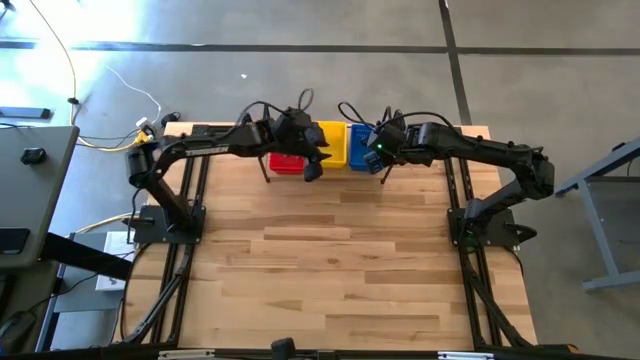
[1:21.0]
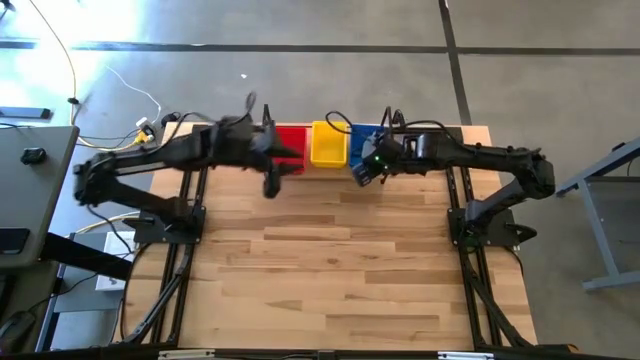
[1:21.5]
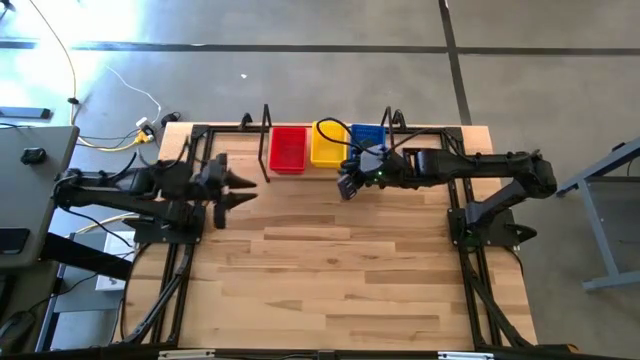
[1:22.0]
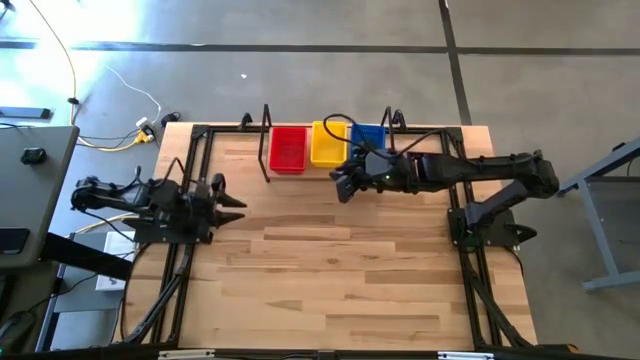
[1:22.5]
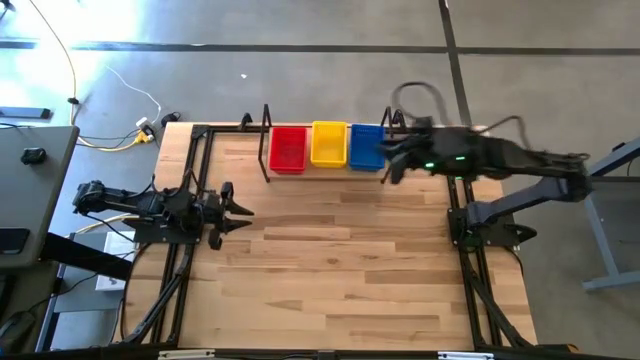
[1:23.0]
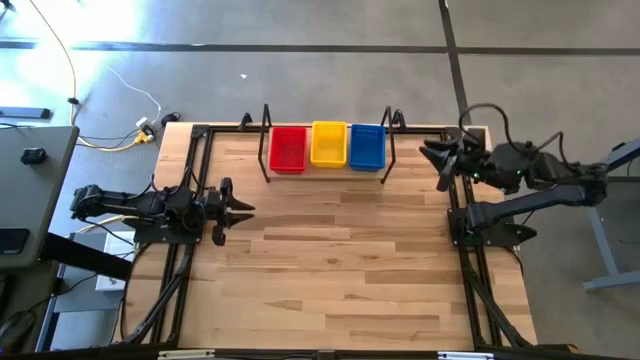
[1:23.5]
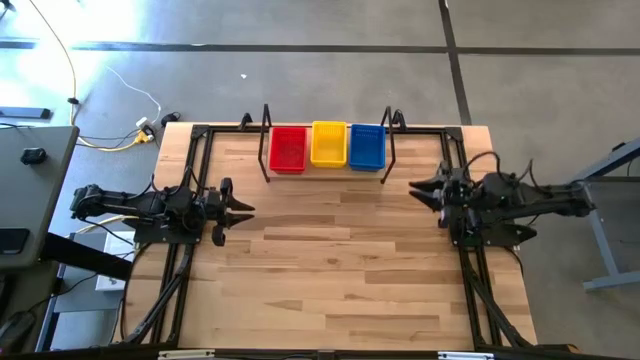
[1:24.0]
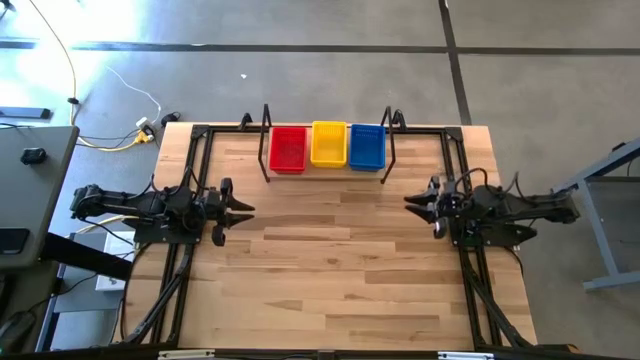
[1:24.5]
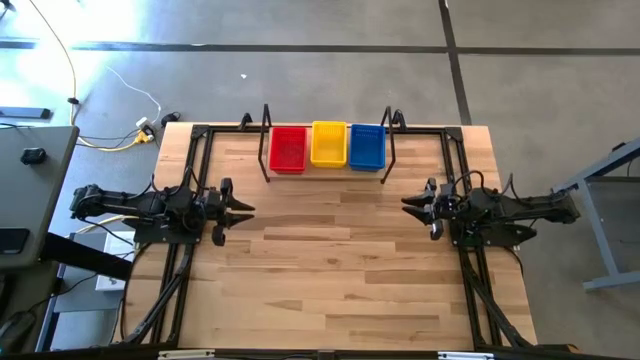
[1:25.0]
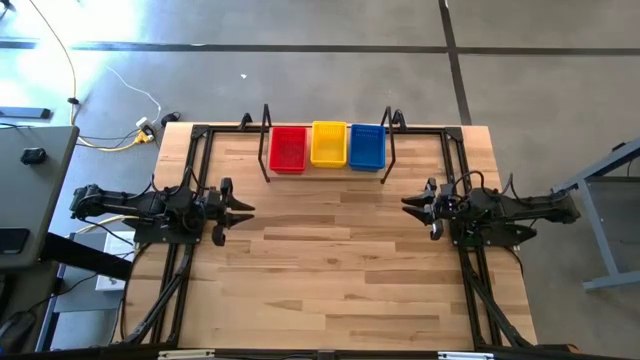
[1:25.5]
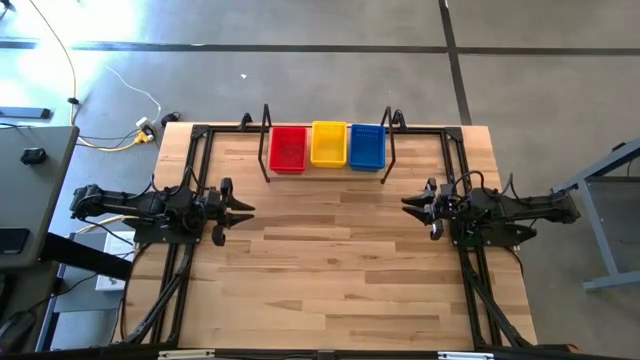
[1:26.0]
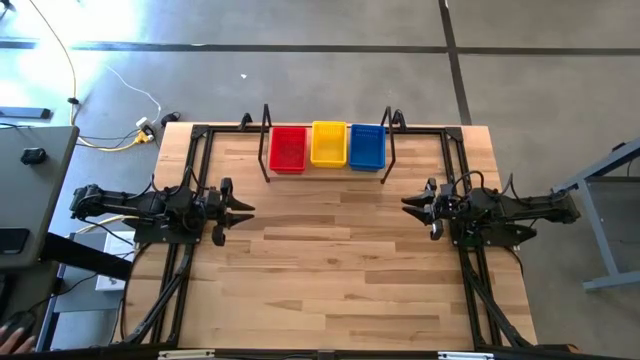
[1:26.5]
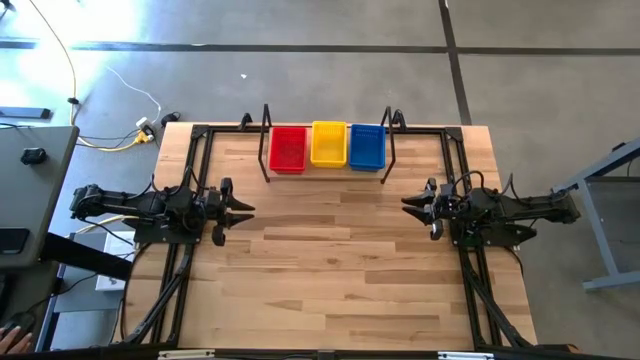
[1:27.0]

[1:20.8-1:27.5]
Task: Stack baskets on shelf by color
Return to Home Position

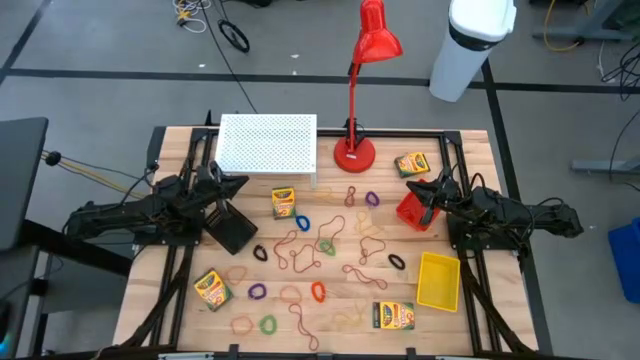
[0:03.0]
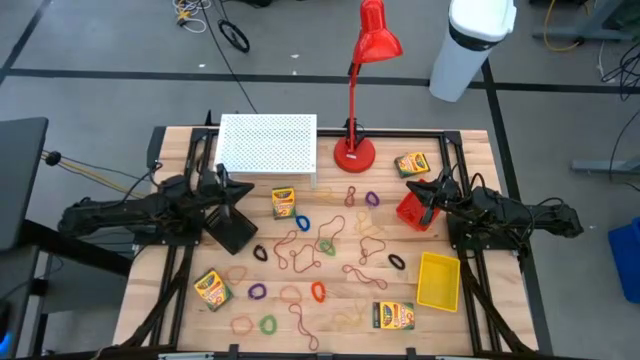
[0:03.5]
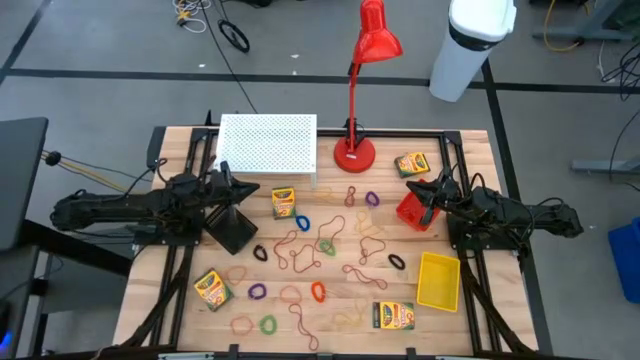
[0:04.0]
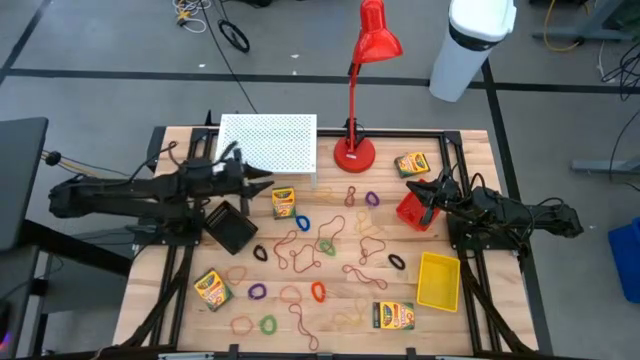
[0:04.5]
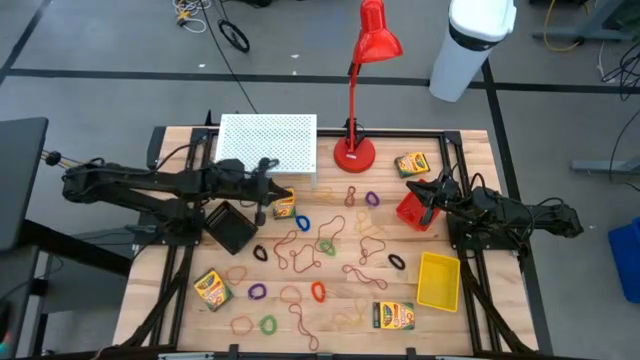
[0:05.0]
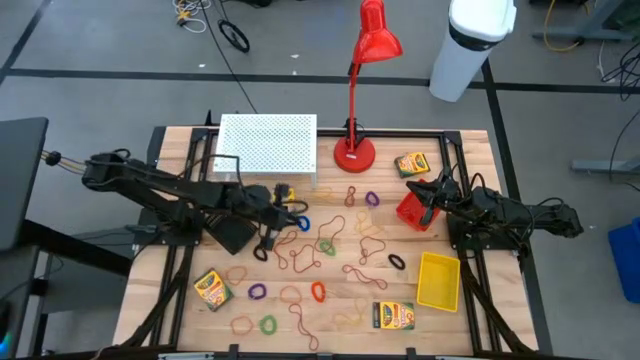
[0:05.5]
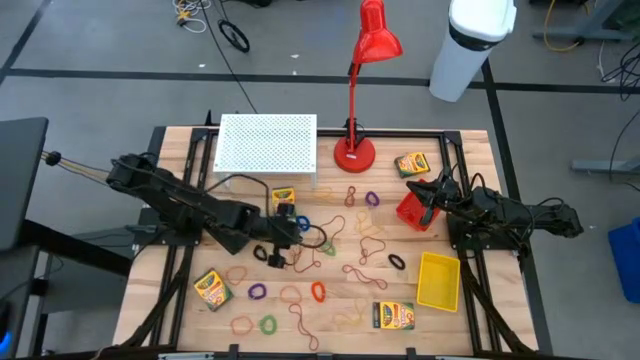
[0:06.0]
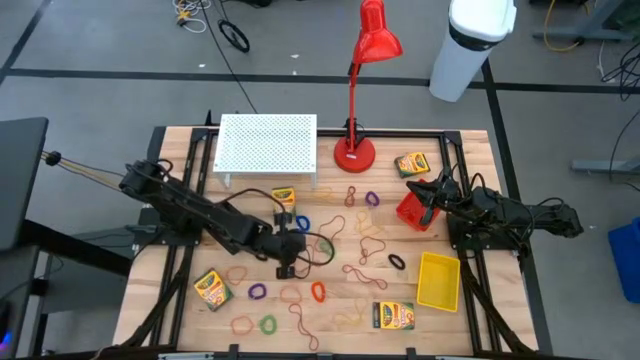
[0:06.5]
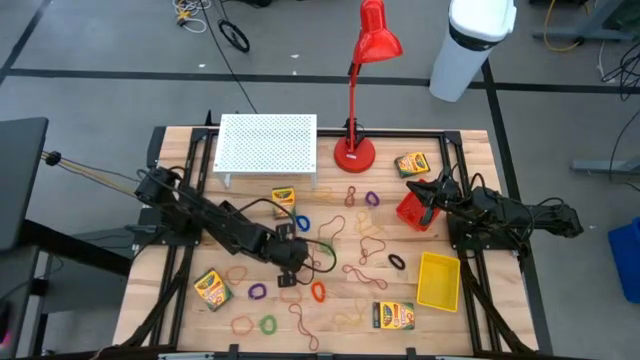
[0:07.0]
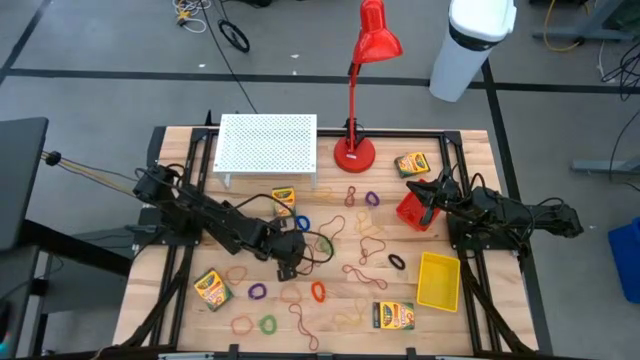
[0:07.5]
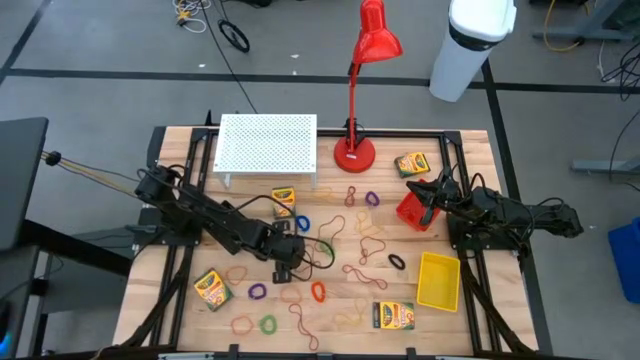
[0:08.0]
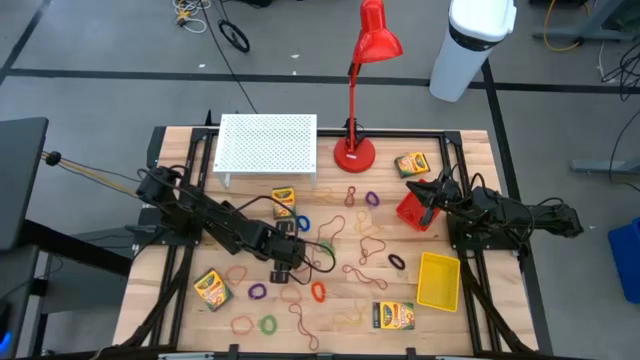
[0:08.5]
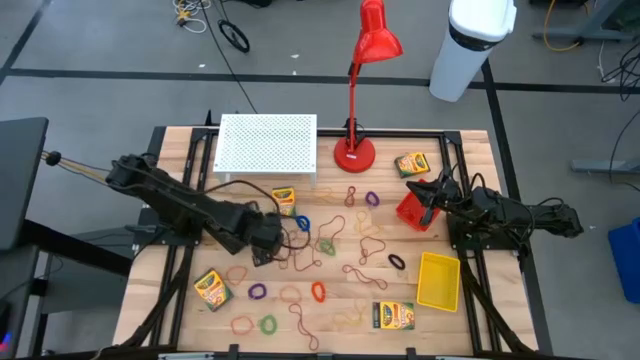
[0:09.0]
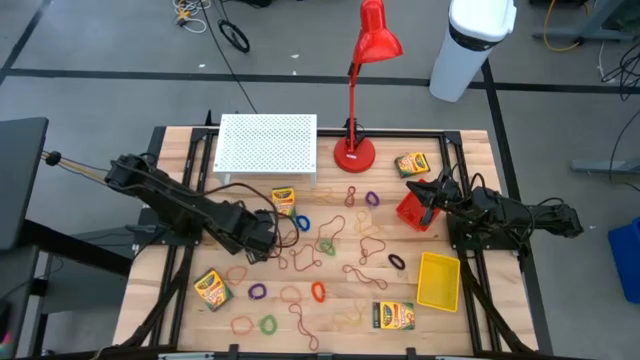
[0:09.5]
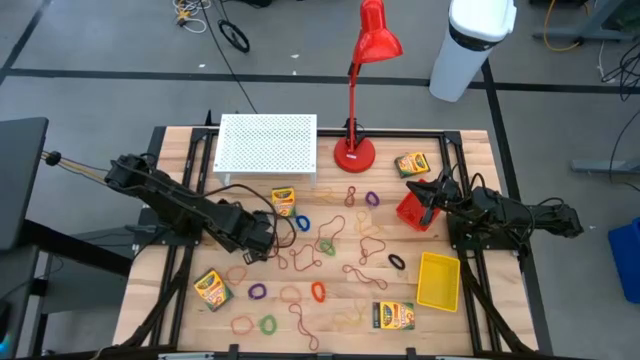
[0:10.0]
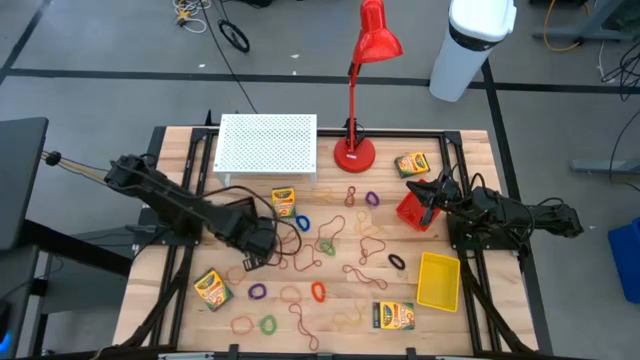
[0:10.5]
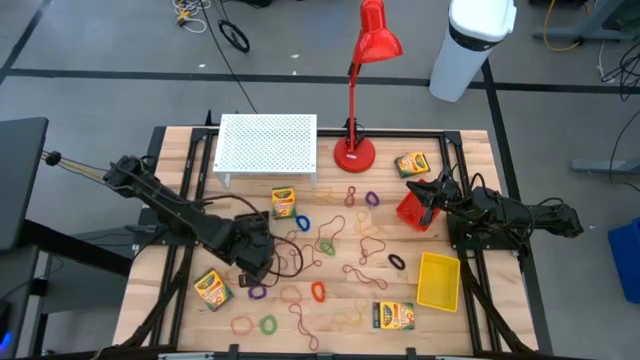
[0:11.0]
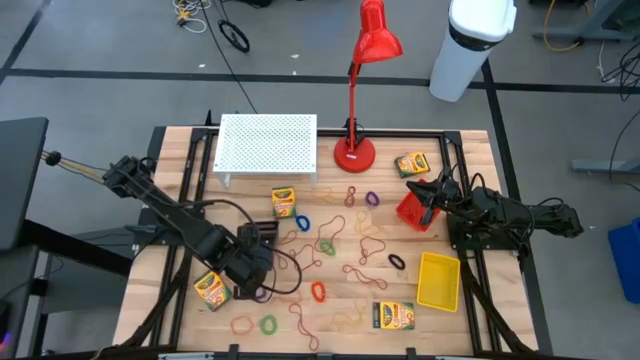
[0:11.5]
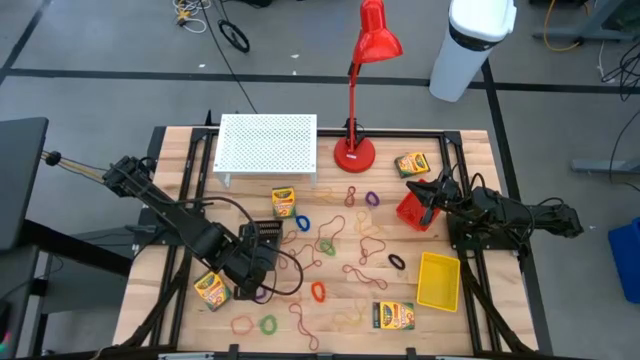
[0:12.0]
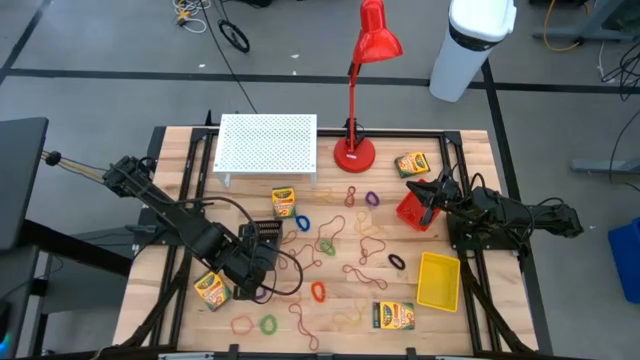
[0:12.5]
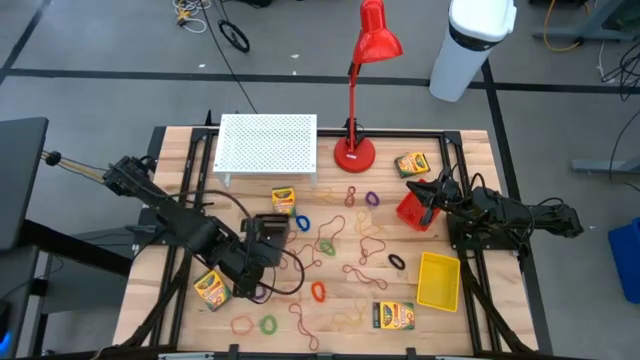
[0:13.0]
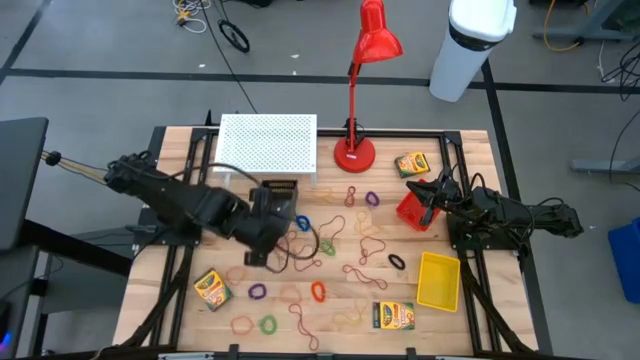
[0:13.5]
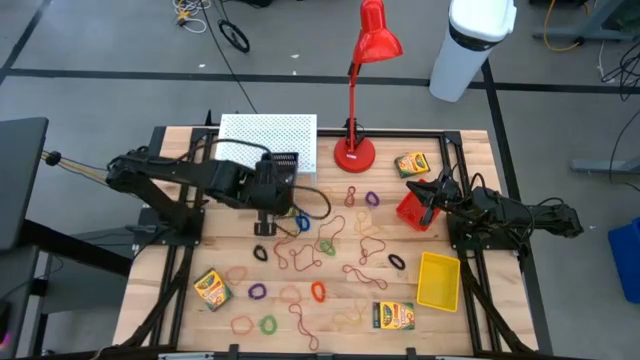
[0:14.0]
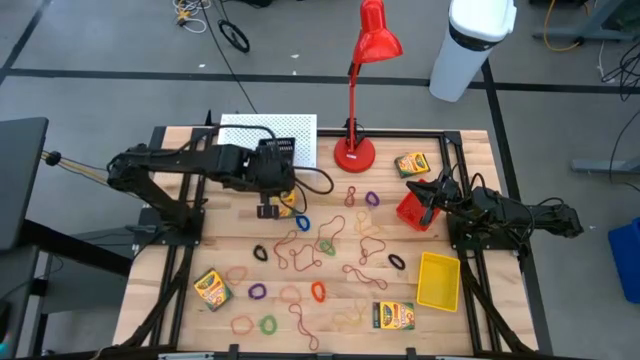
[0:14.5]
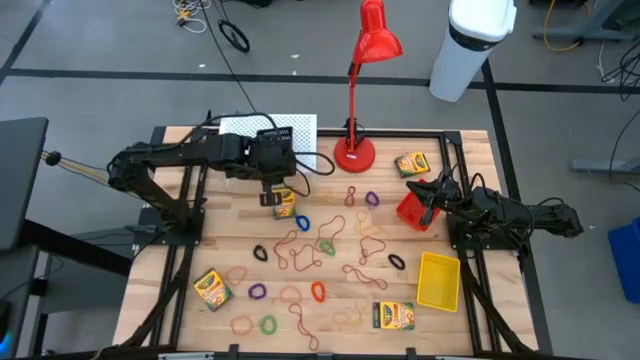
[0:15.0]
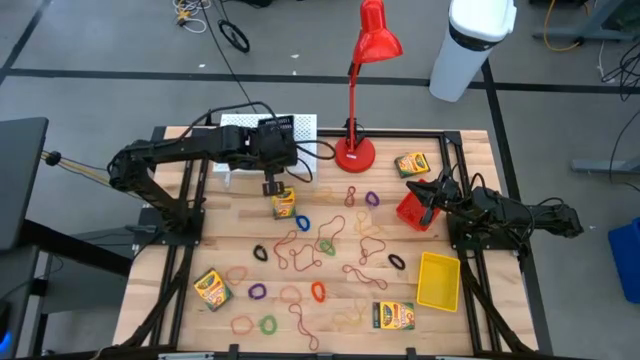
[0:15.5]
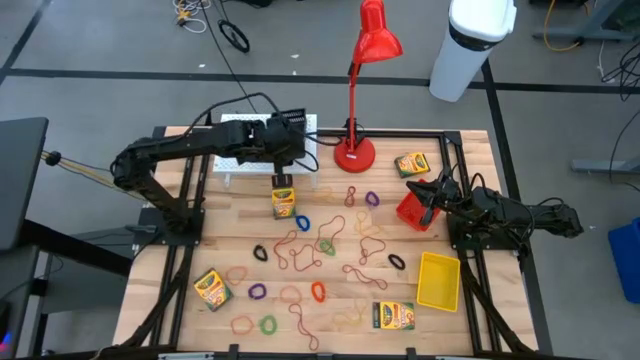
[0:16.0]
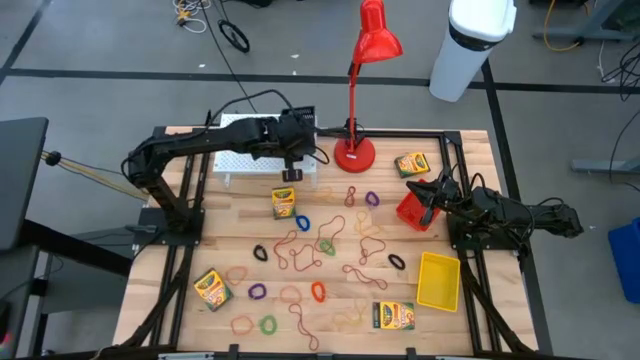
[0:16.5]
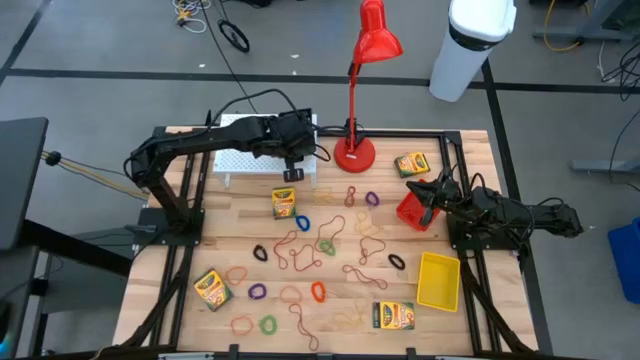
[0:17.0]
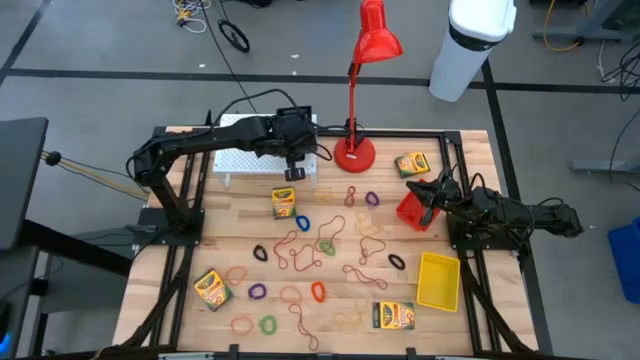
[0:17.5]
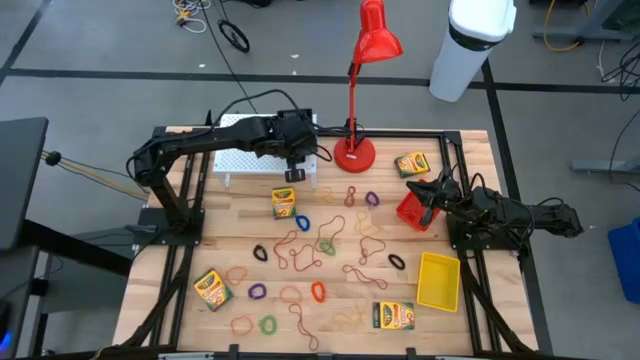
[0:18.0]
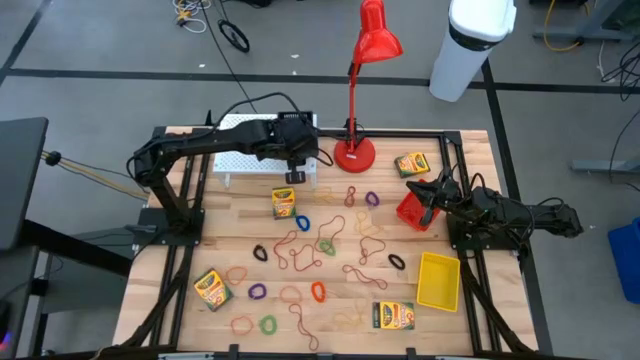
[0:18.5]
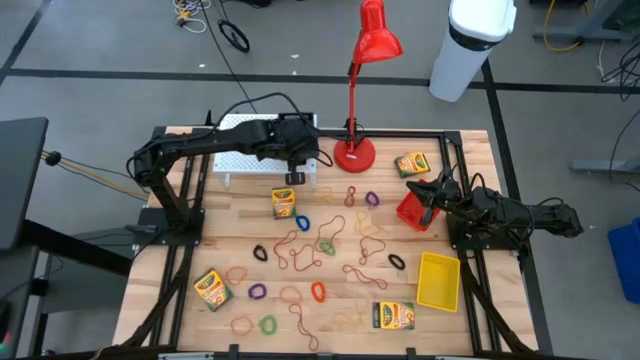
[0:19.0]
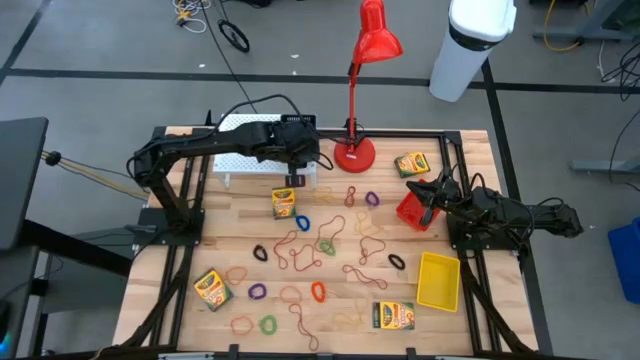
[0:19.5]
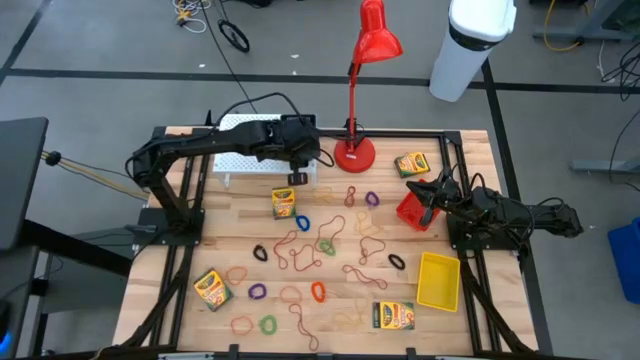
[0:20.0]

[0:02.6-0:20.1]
Task: Pick & Place Office Desk Supplies
Put the black bin on the shelf
